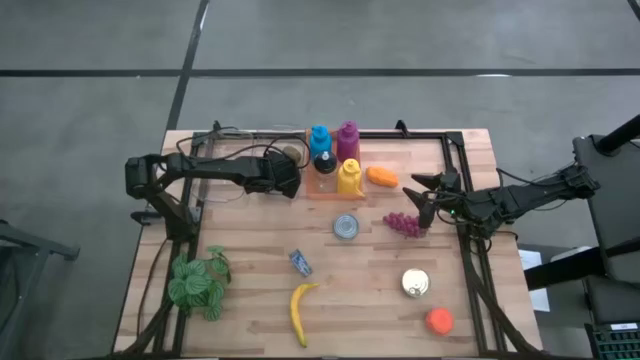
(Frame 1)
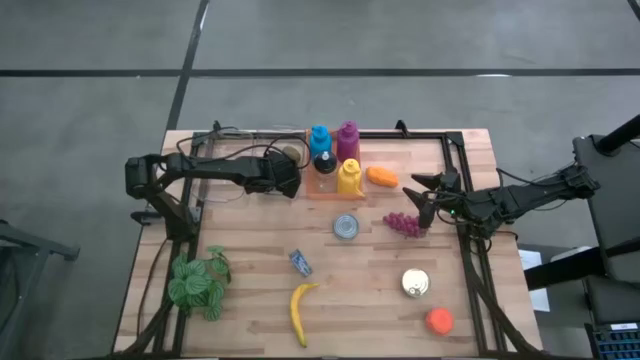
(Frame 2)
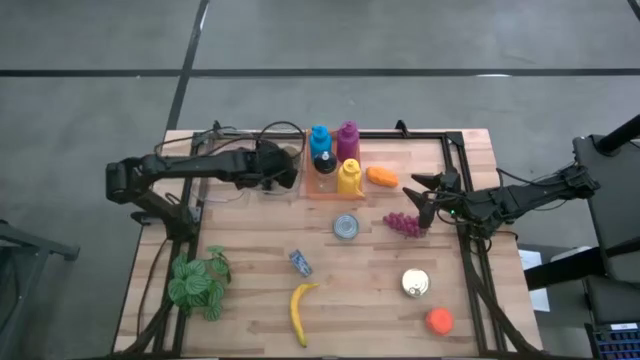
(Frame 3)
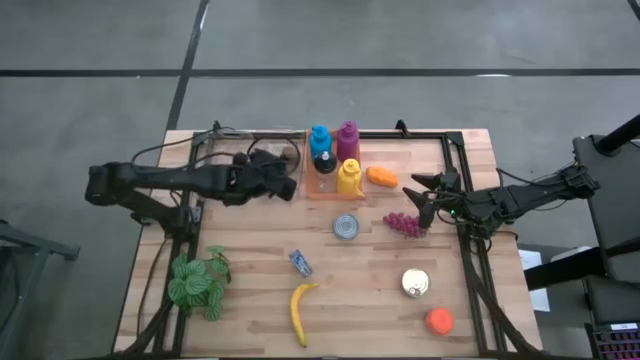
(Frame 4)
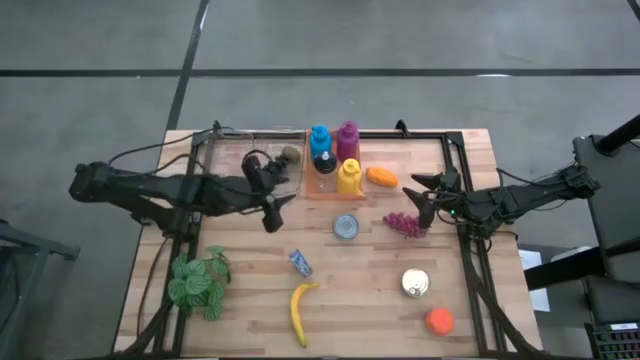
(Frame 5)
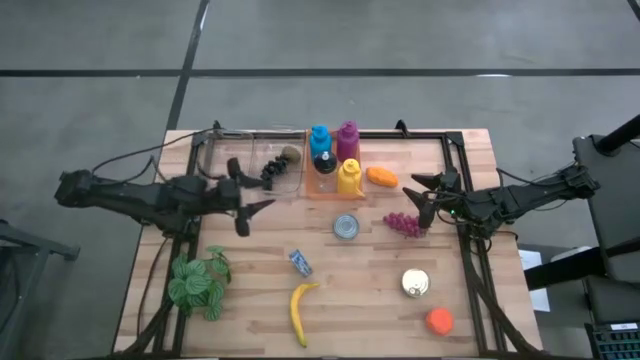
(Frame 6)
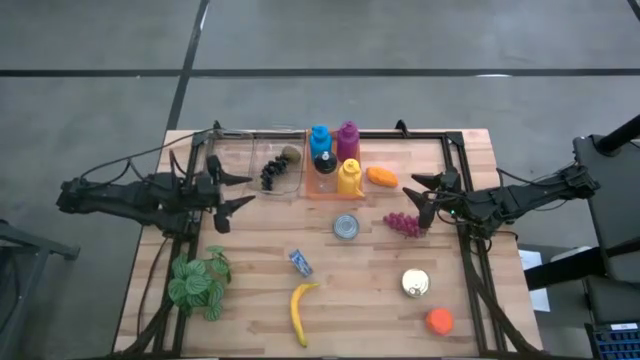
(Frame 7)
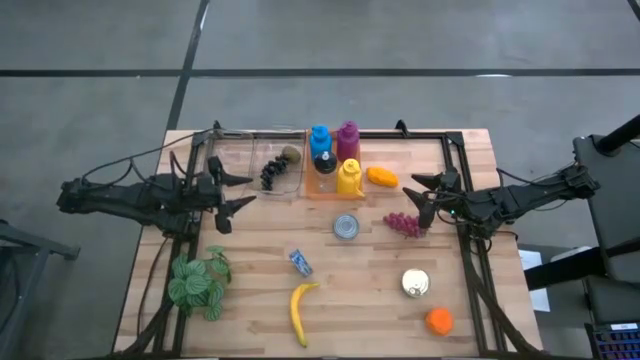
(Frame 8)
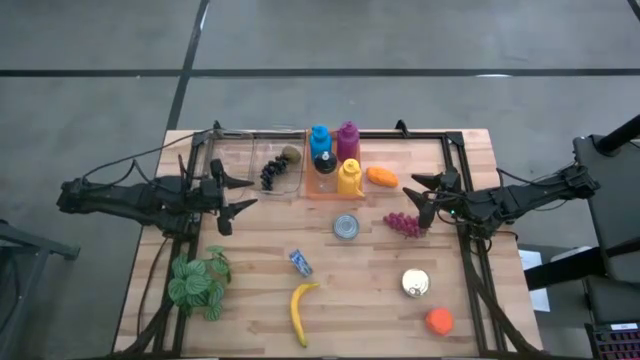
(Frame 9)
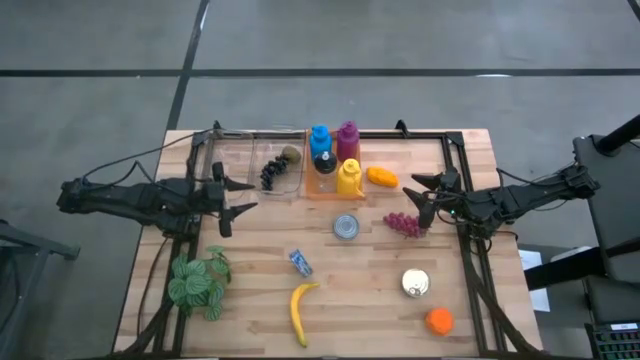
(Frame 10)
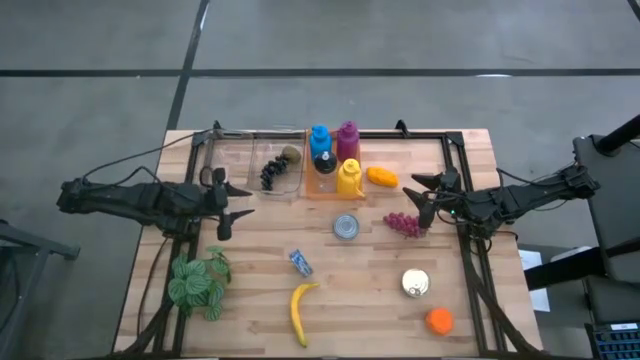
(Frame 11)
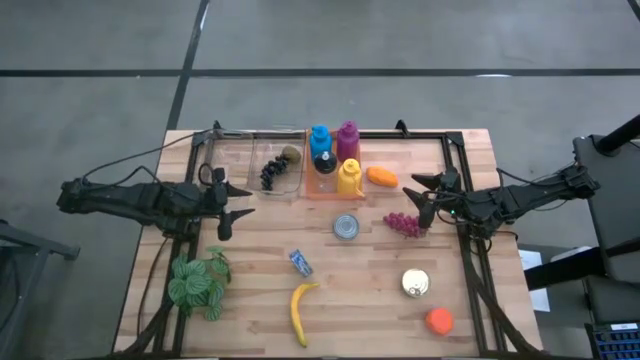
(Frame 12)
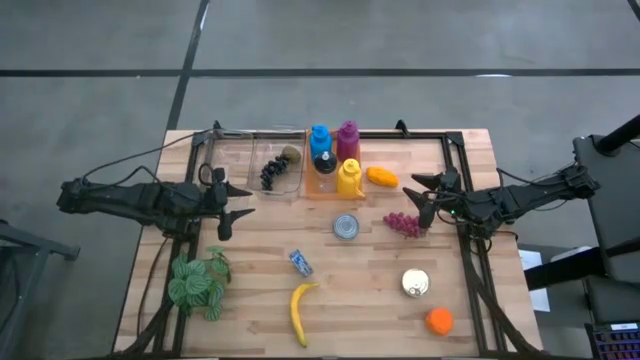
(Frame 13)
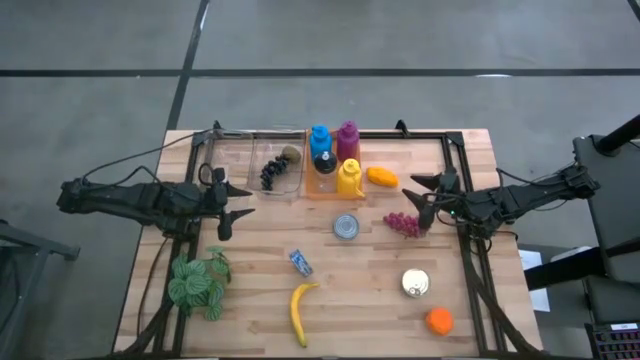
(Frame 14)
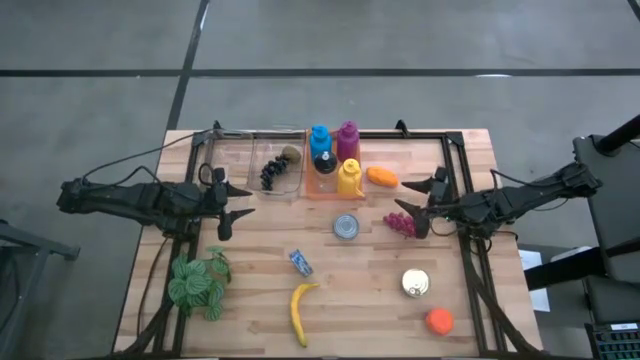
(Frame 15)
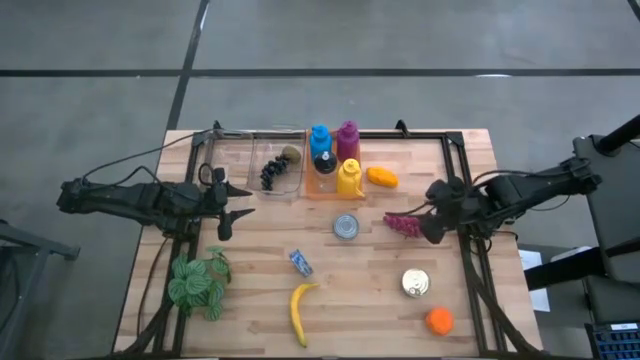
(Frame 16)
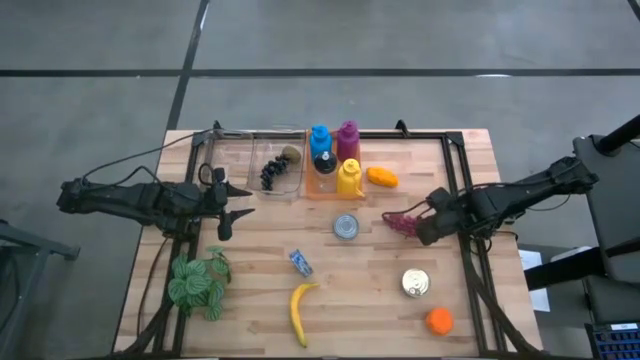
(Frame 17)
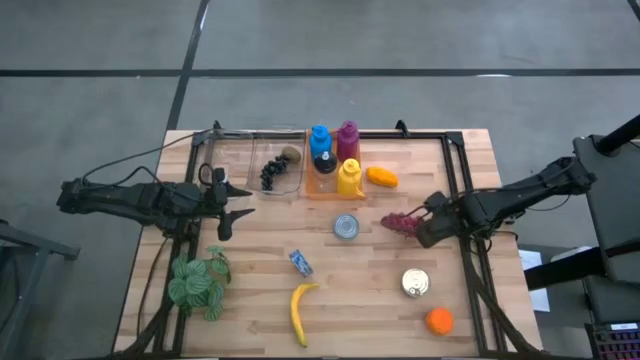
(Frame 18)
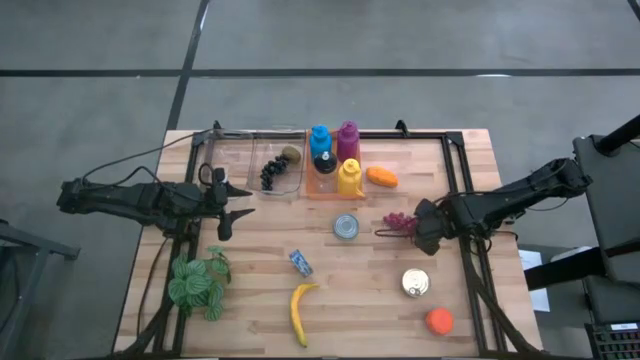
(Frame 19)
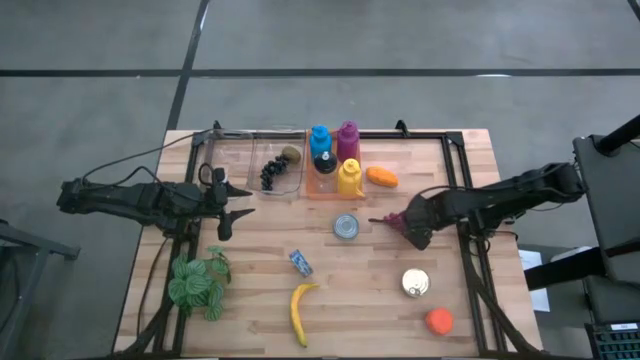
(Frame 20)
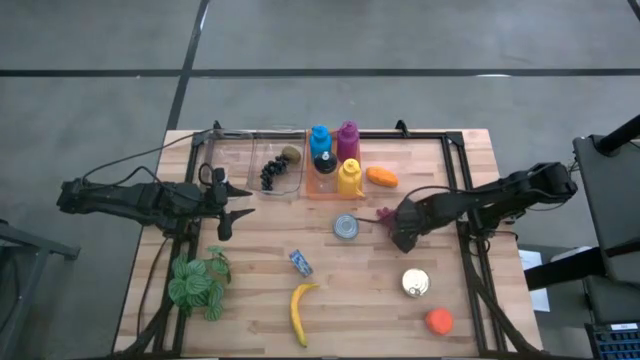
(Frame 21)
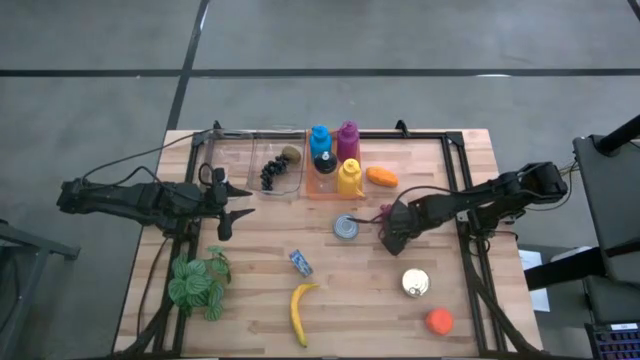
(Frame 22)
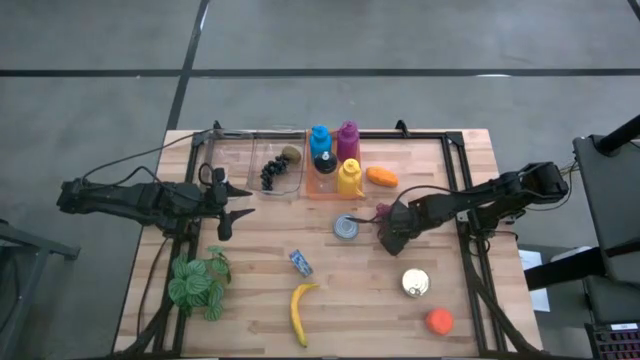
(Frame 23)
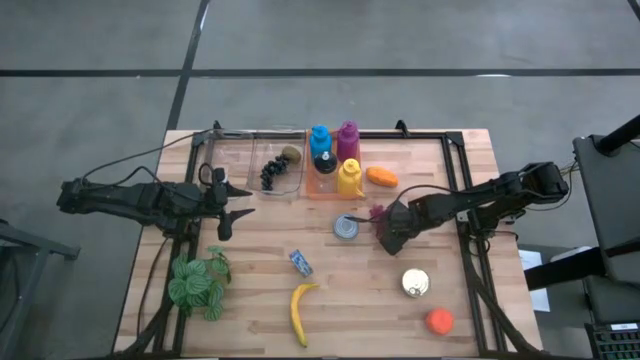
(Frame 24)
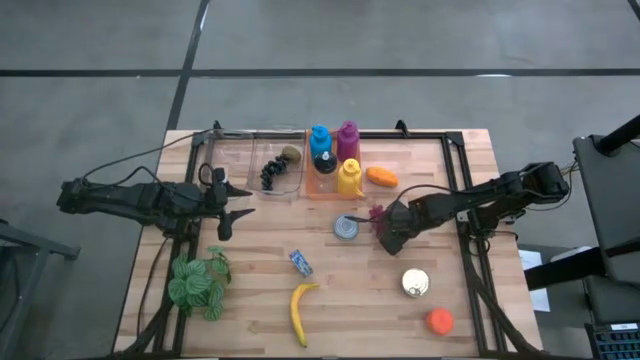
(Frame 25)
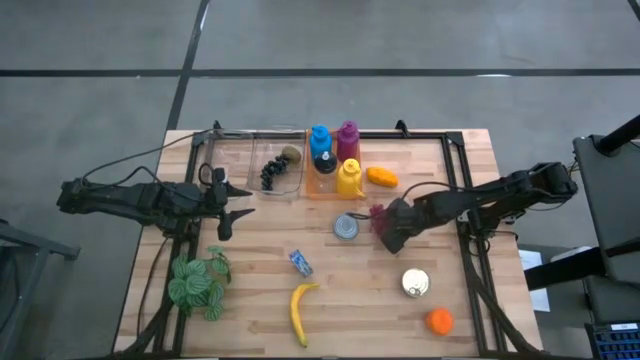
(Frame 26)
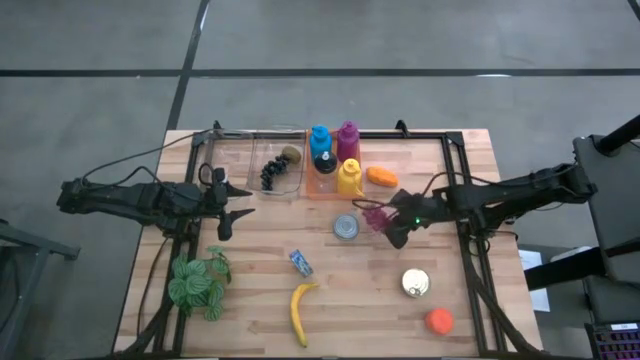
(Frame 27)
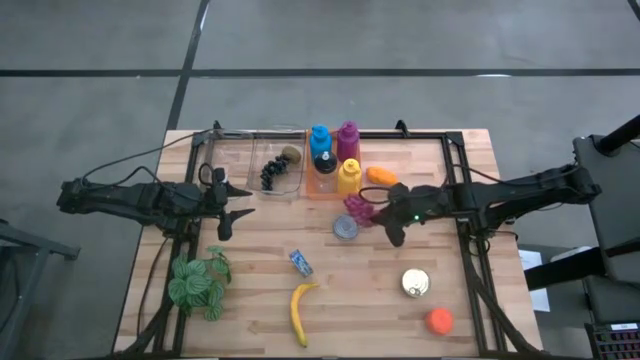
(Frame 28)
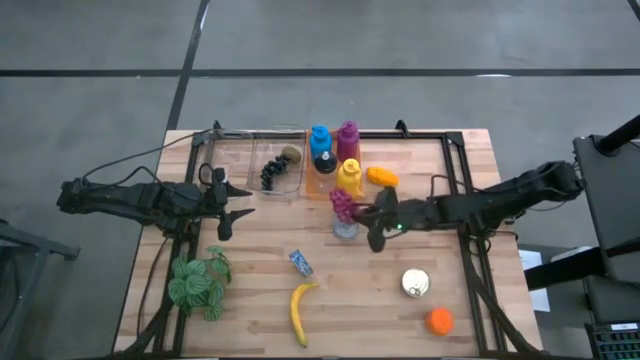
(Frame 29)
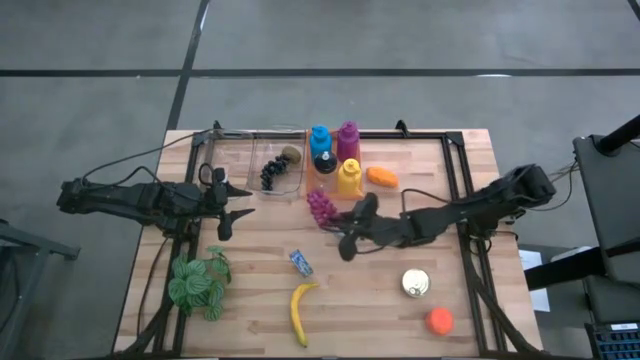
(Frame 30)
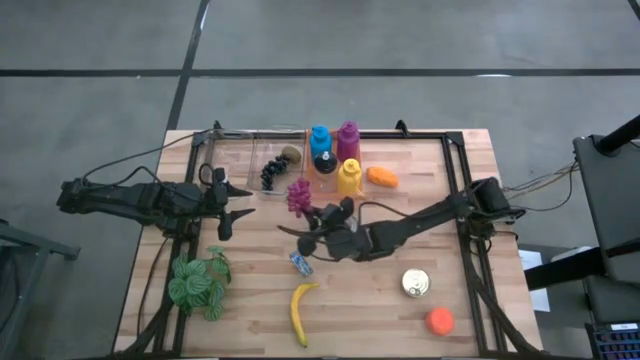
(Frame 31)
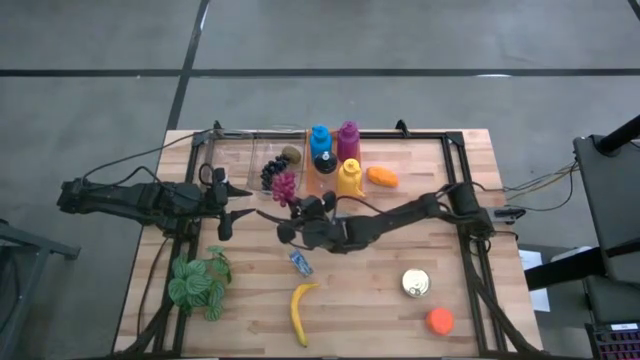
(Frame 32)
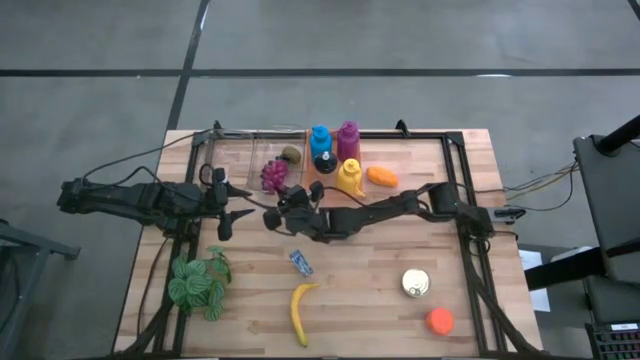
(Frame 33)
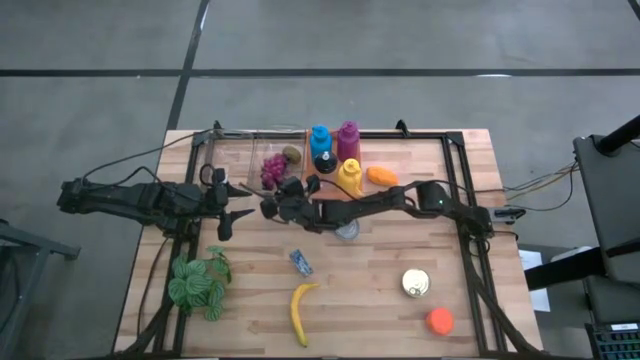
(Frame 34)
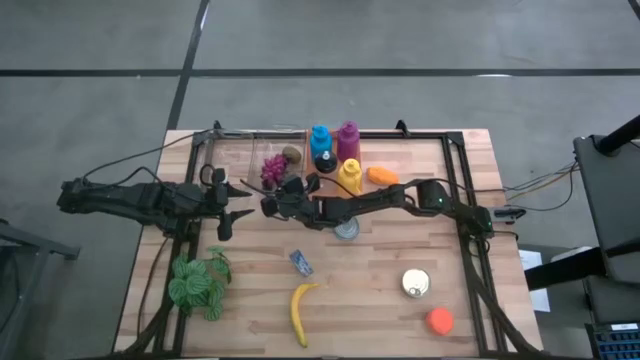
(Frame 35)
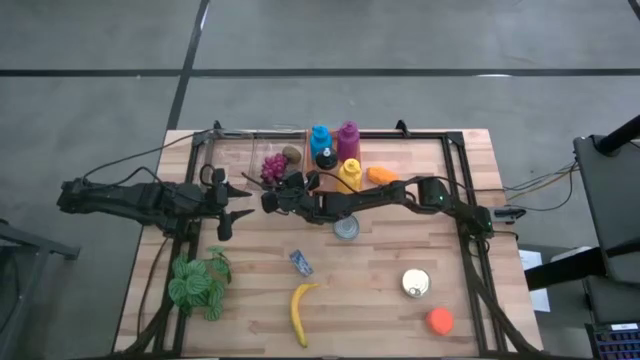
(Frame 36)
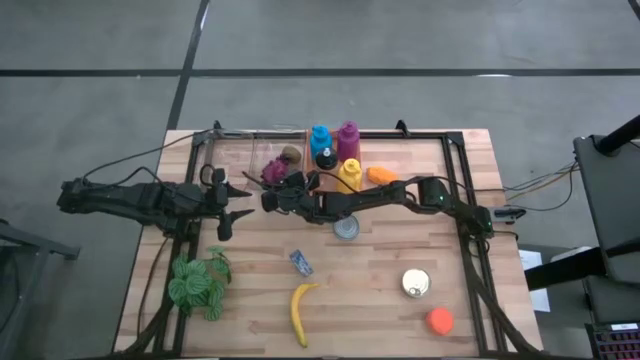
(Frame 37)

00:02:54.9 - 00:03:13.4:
Task: Pick & Place Food Item
Put the purple grapes into the right transparent bin
